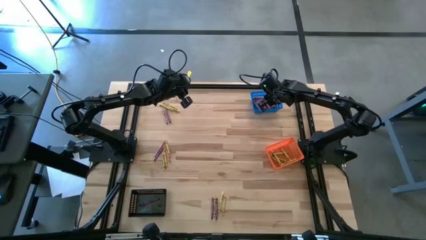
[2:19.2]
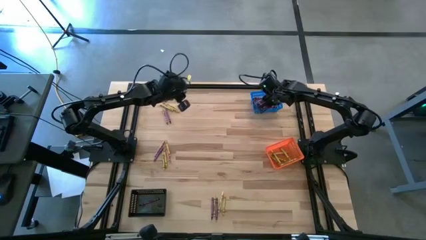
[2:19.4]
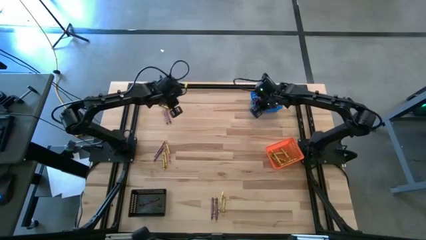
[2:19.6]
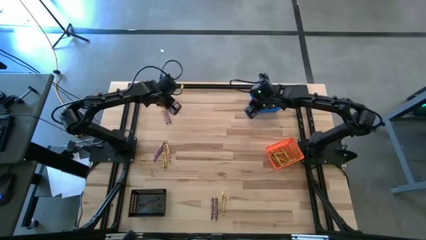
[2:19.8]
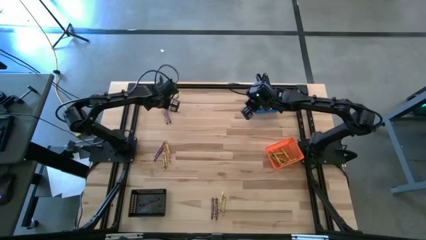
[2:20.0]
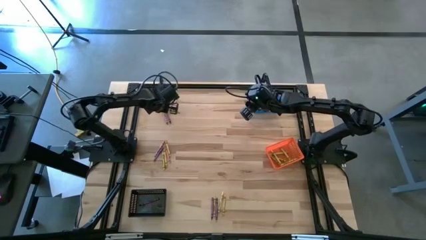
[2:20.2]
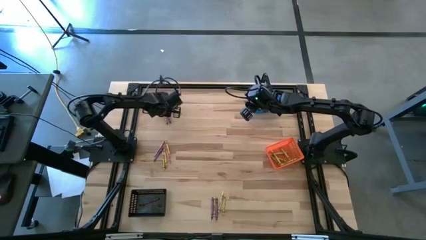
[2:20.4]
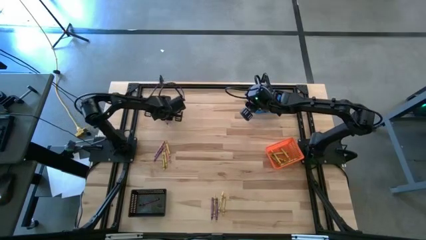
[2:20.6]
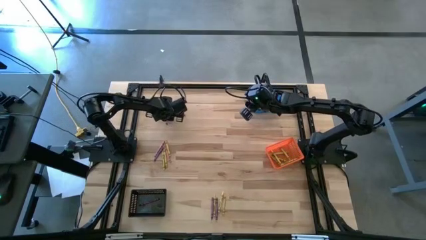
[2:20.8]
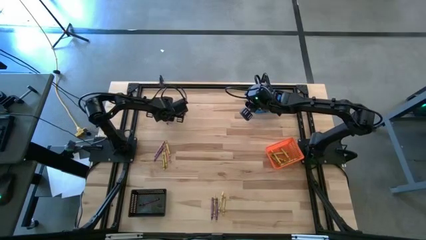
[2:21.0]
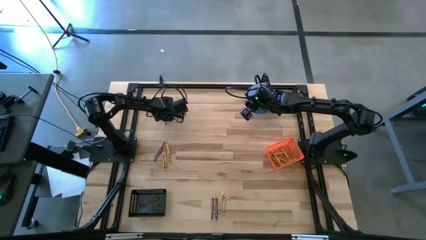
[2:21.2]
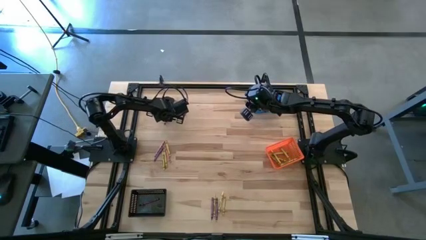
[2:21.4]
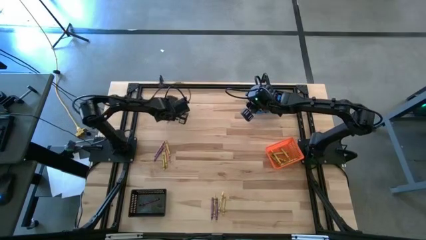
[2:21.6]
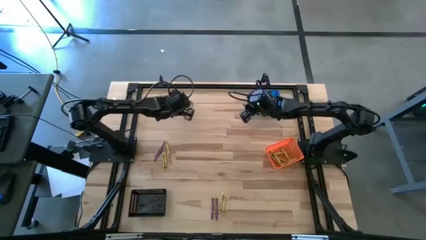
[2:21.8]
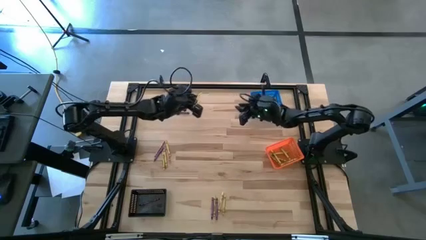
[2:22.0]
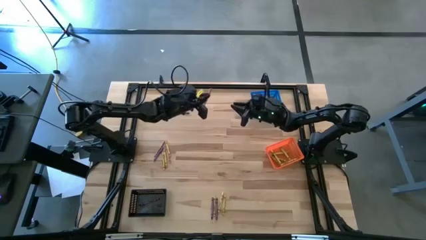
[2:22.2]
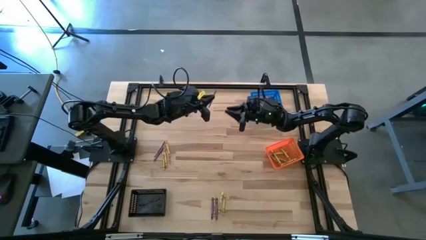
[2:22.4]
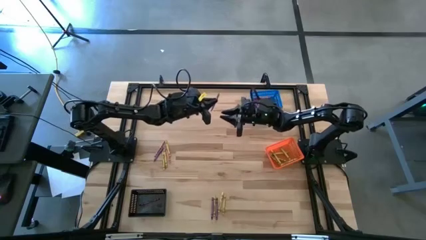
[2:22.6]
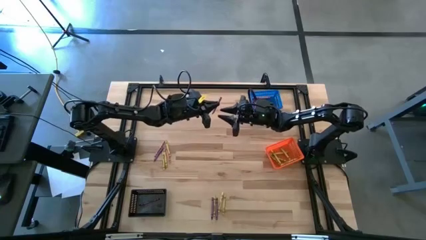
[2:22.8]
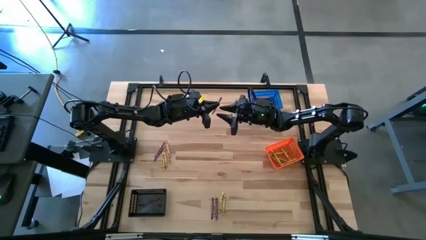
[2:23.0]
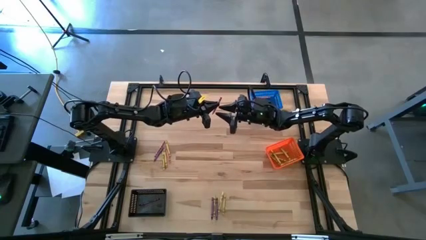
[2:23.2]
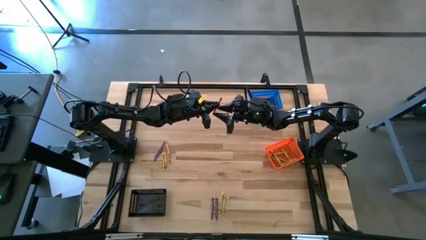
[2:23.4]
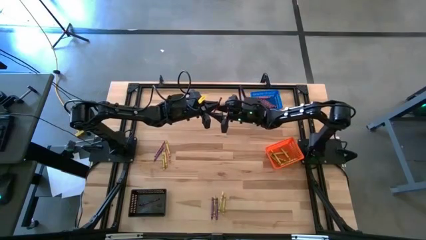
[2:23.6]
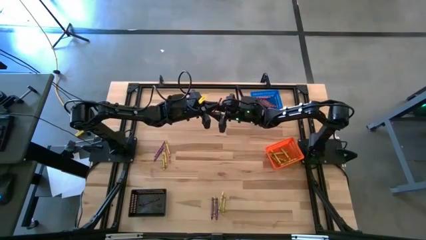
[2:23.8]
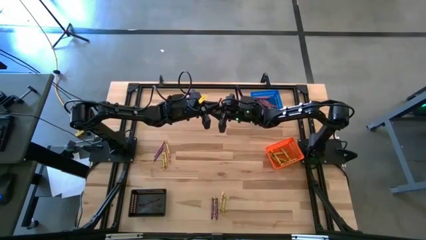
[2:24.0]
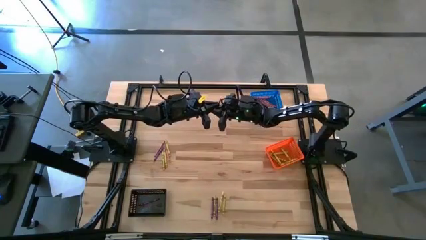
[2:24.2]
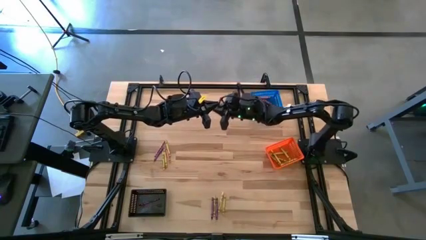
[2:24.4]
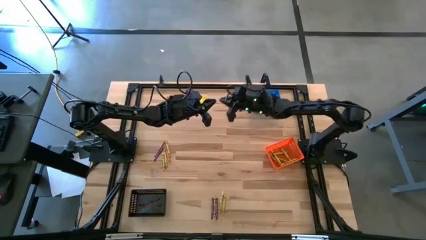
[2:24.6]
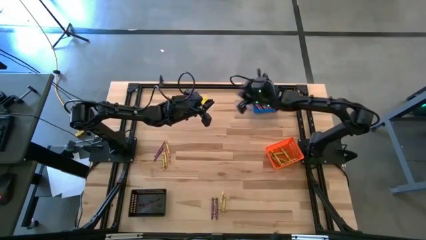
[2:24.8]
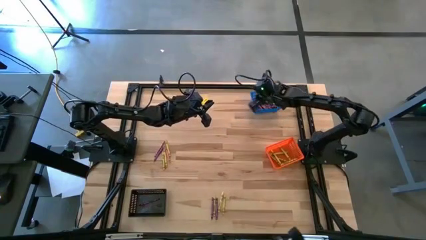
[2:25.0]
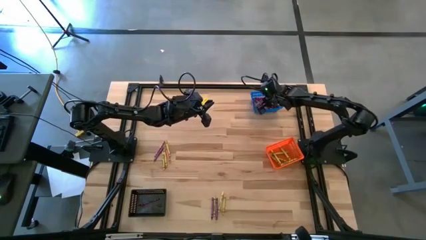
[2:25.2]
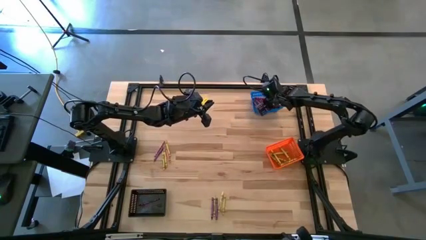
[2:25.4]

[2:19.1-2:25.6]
Task: Sort crayons
Put the red crayon into the blue basket

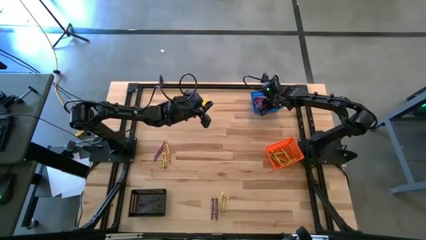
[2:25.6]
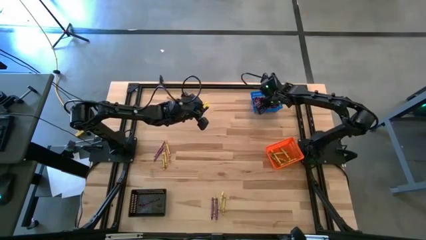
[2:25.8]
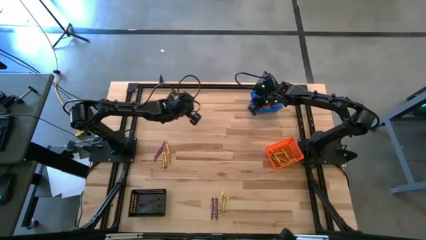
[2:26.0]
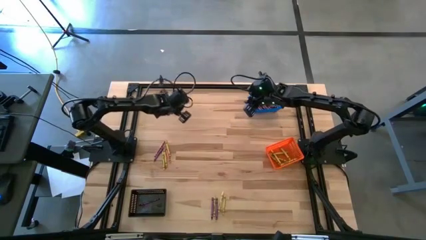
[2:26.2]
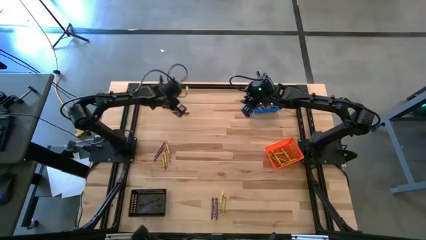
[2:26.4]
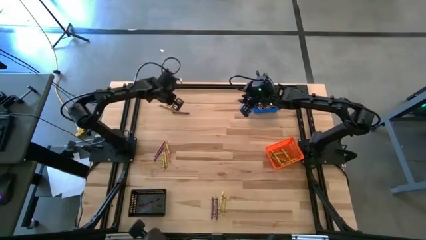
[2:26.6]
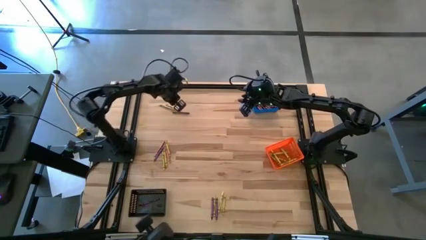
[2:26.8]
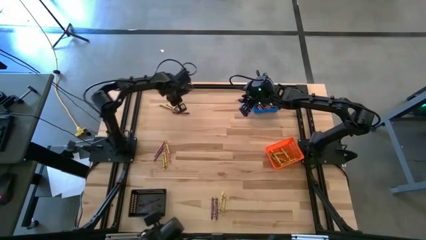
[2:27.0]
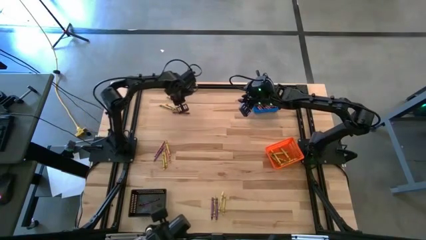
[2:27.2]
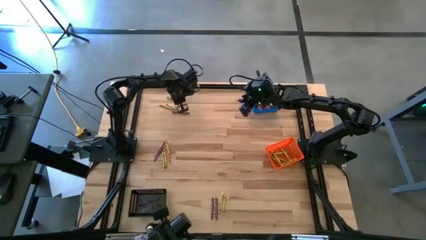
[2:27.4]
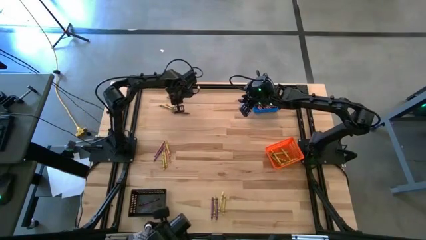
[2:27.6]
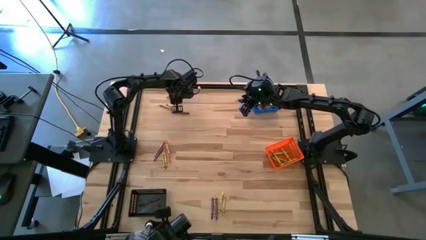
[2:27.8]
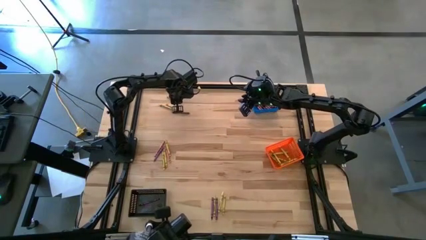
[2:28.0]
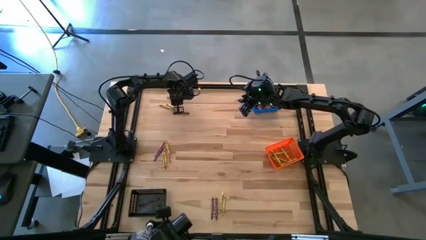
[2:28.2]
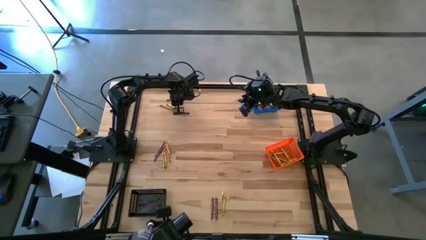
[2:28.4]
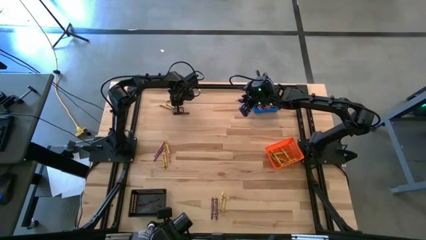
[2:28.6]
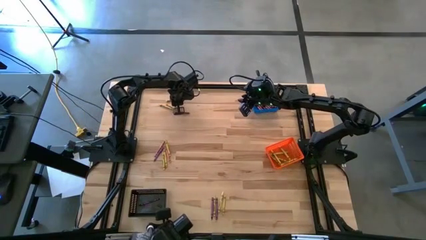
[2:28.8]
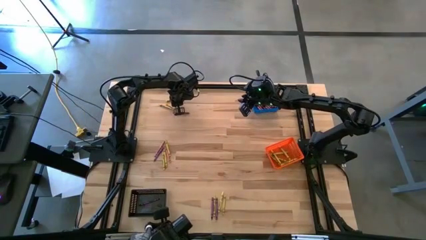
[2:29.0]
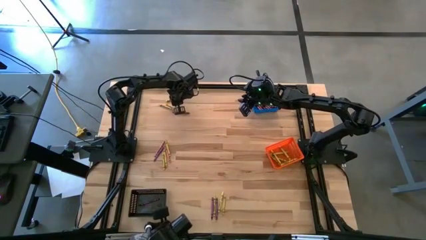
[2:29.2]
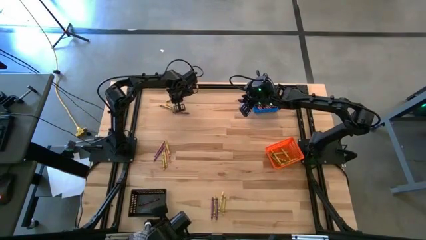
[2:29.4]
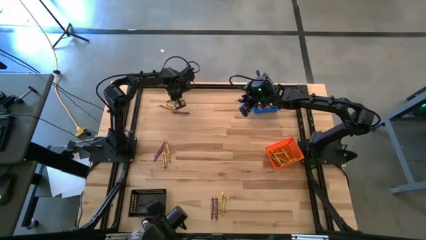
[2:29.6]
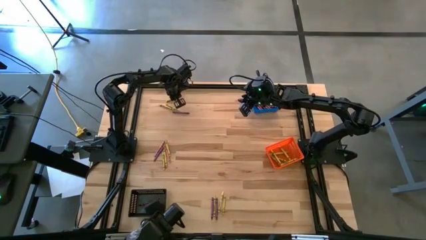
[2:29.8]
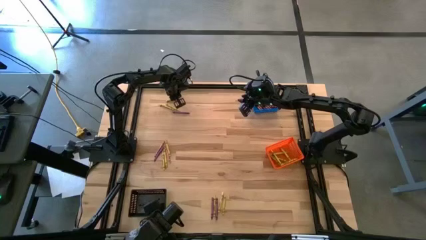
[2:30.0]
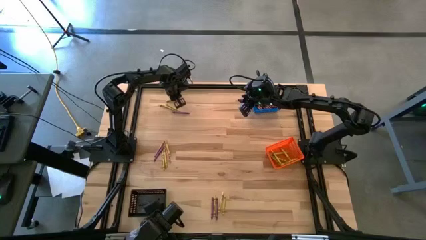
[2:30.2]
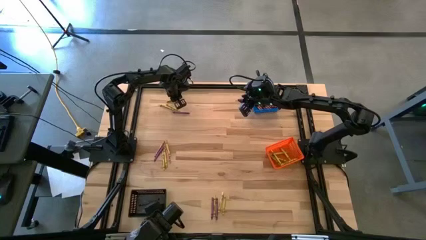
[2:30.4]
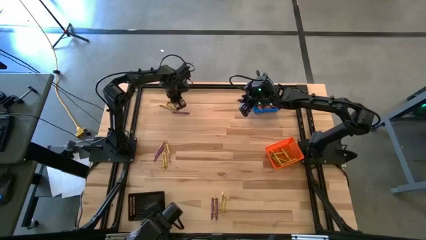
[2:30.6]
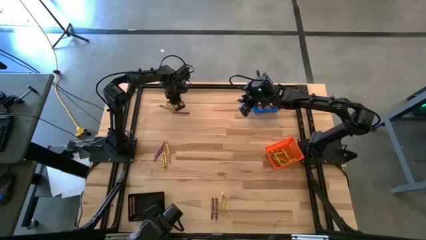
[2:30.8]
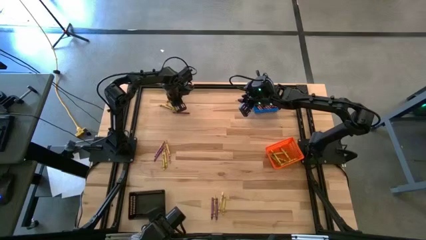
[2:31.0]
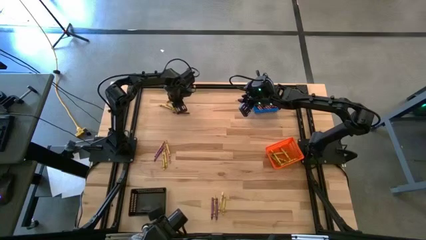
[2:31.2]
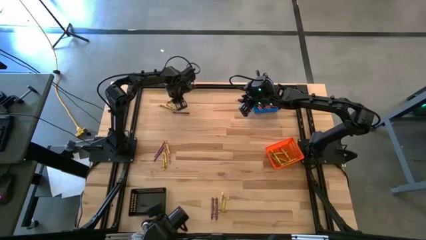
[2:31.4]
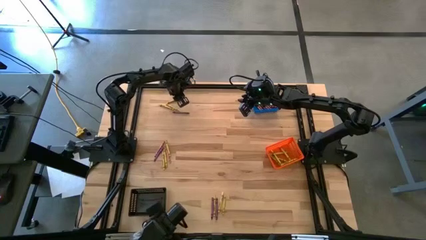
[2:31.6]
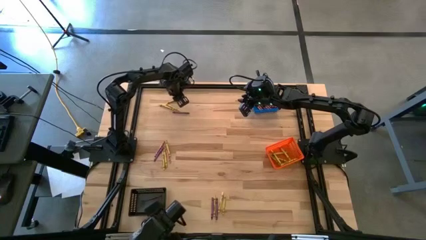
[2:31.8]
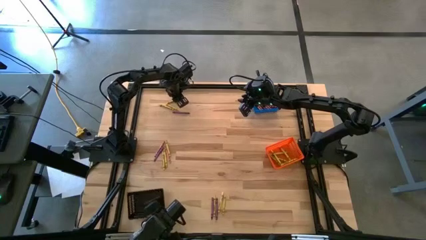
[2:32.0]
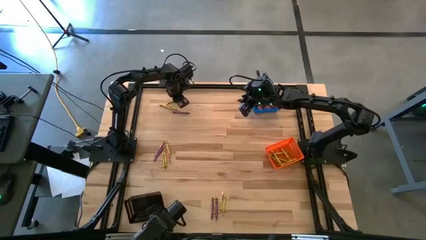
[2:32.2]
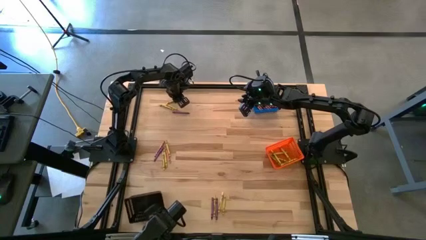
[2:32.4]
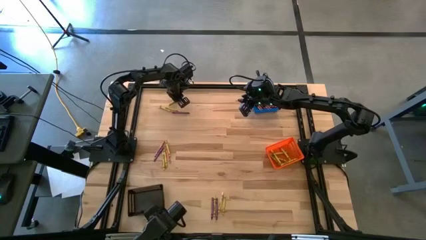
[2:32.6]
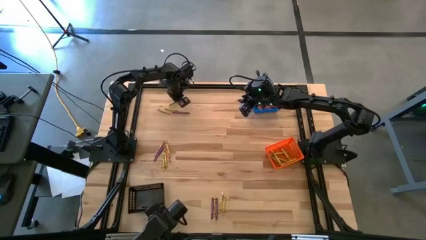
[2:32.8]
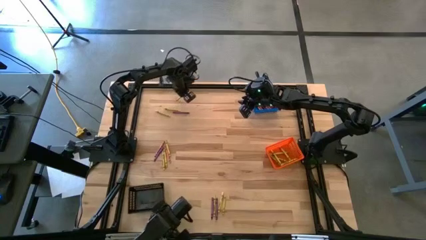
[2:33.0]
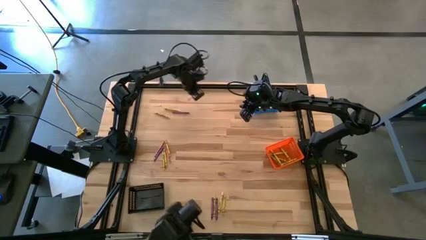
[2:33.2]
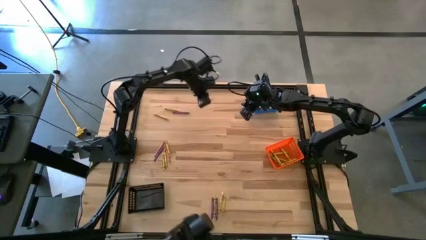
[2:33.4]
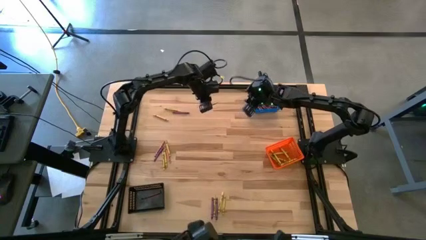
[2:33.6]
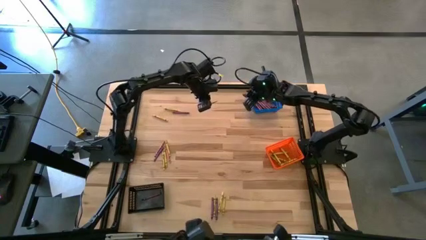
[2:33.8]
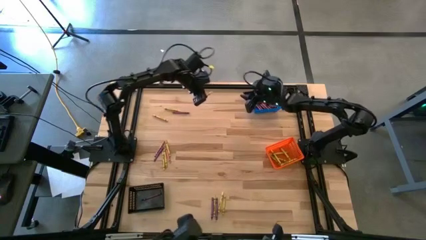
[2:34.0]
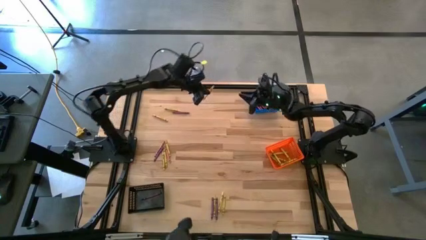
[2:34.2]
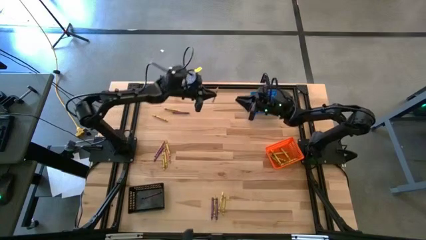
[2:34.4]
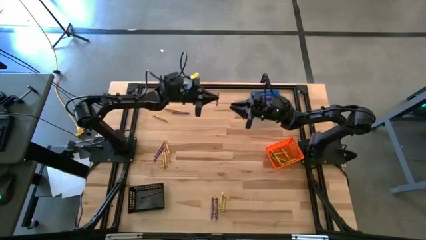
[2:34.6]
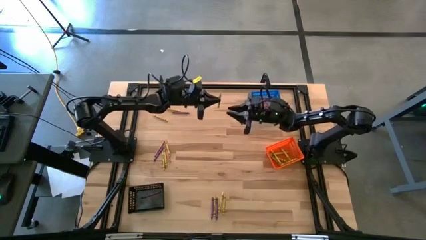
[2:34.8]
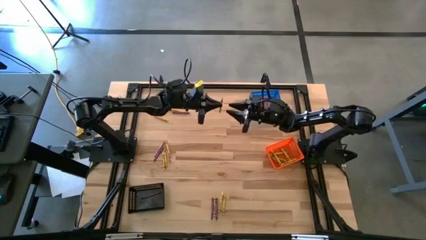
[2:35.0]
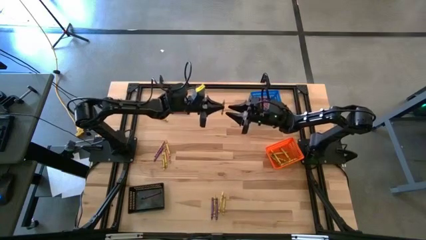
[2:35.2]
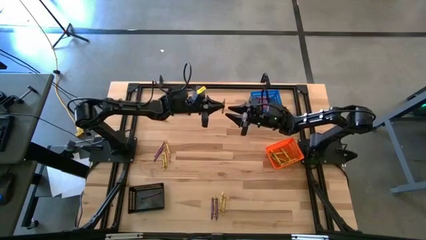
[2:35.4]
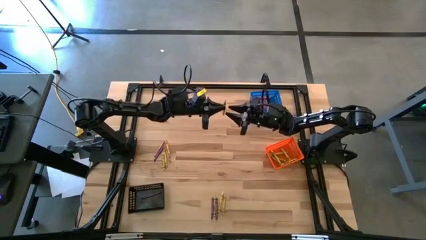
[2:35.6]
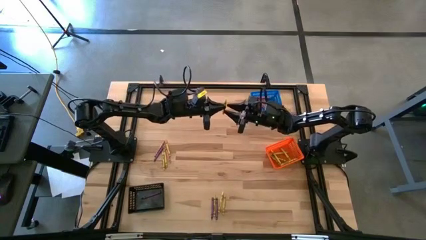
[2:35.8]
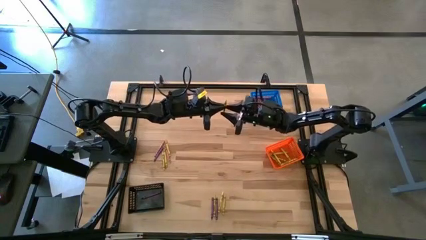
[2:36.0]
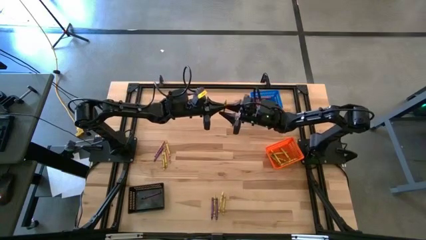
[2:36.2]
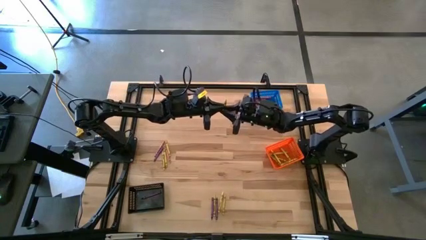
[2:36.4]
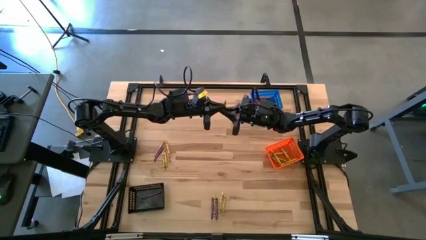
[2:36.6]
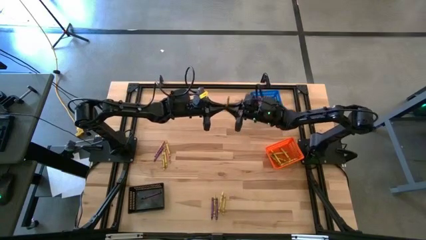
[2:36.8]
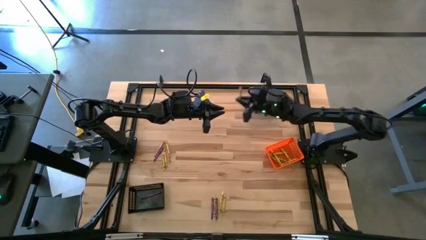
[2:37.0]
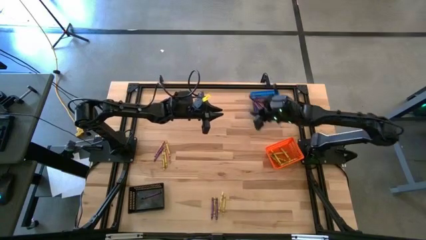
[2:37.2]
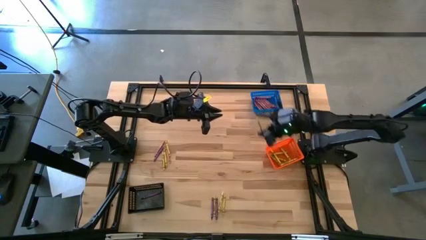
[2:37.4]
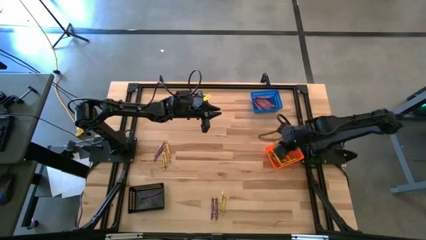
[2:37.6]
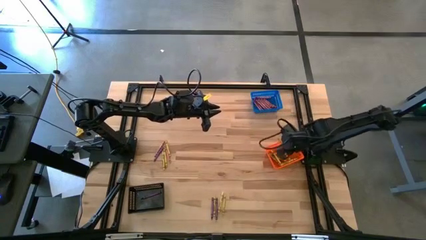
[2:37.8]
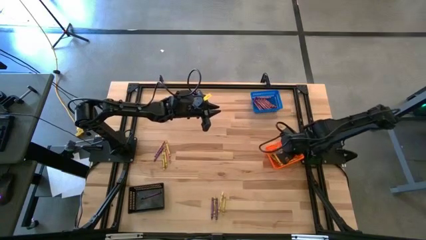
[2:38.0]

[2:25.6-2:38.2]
Put the yellow crayon into the orange basket
